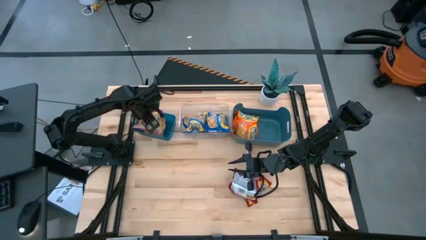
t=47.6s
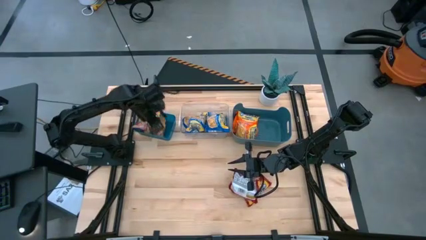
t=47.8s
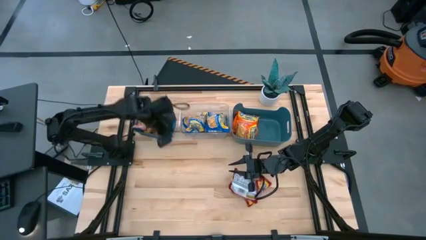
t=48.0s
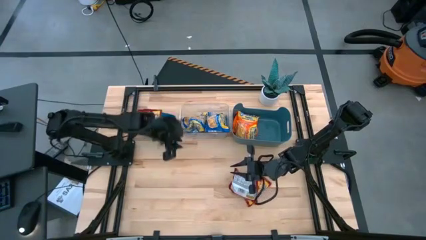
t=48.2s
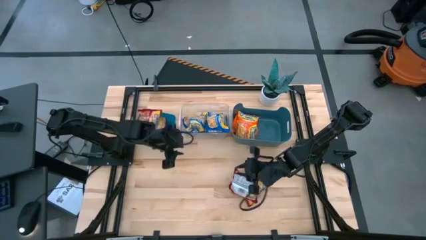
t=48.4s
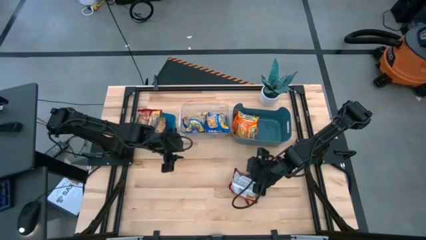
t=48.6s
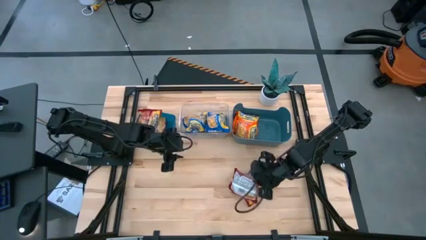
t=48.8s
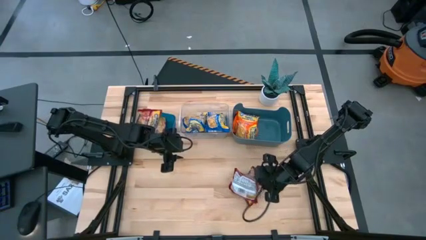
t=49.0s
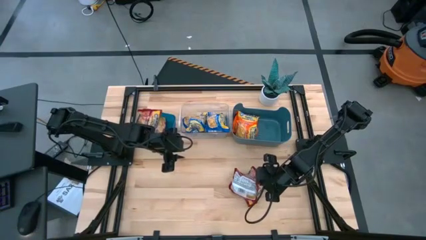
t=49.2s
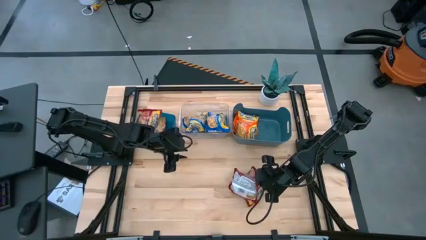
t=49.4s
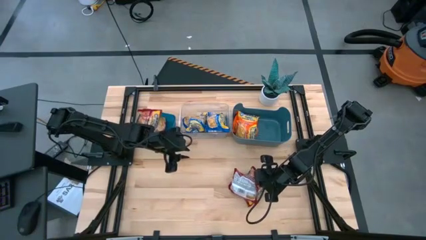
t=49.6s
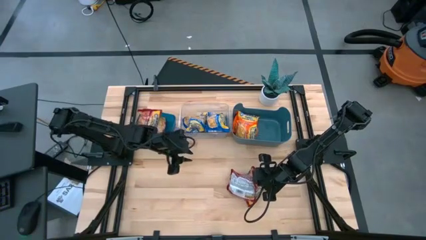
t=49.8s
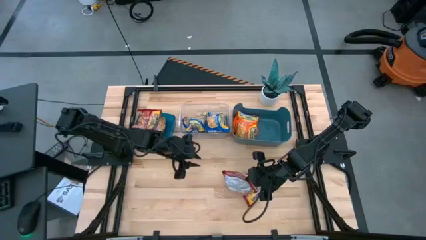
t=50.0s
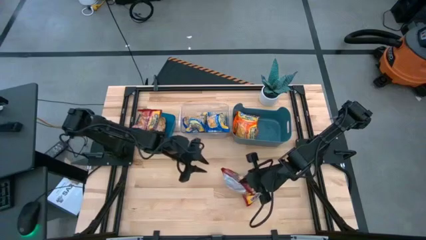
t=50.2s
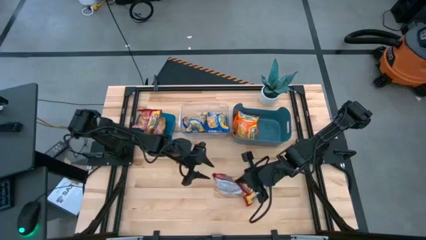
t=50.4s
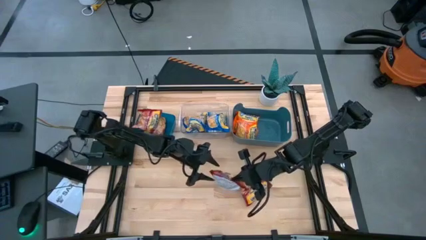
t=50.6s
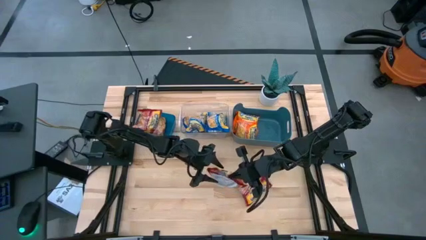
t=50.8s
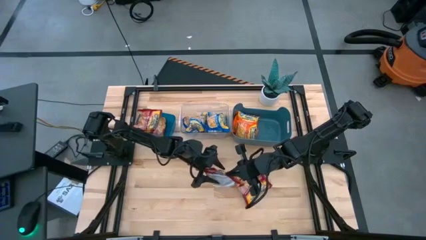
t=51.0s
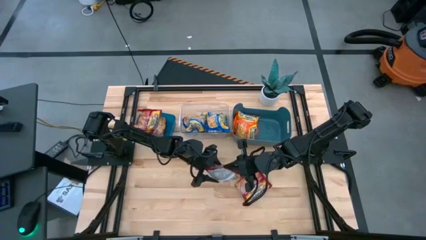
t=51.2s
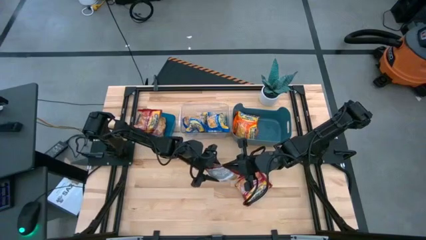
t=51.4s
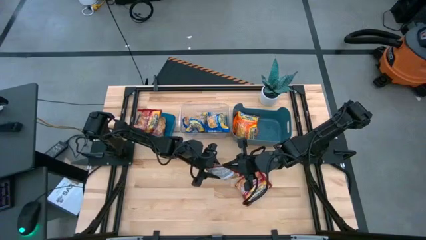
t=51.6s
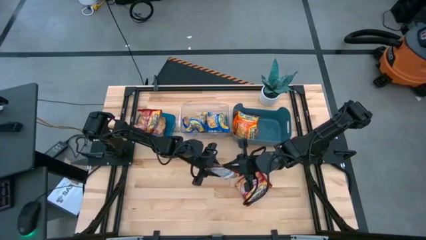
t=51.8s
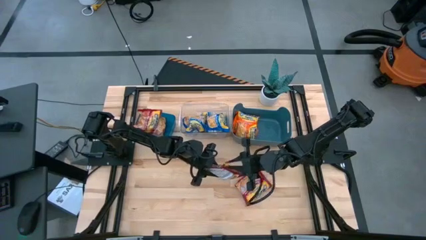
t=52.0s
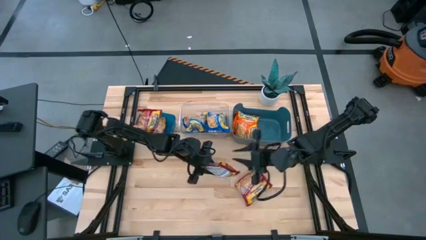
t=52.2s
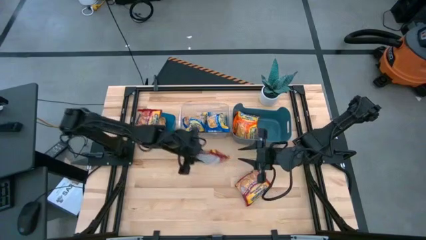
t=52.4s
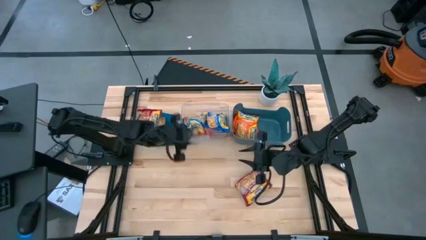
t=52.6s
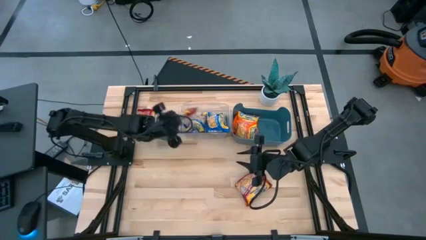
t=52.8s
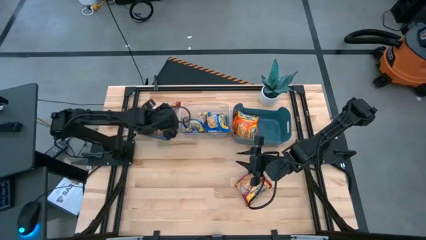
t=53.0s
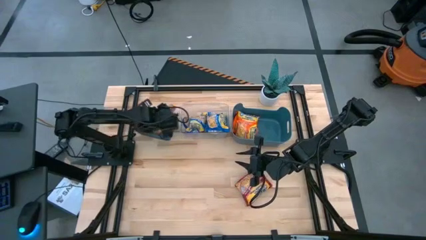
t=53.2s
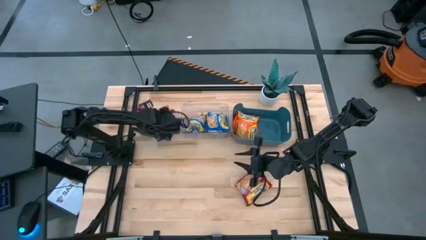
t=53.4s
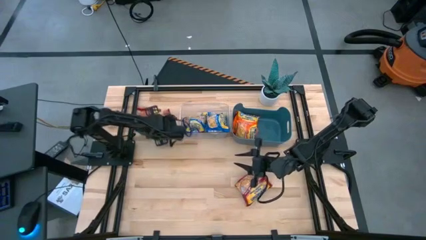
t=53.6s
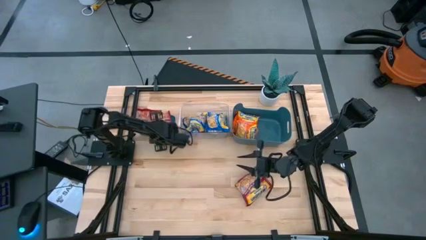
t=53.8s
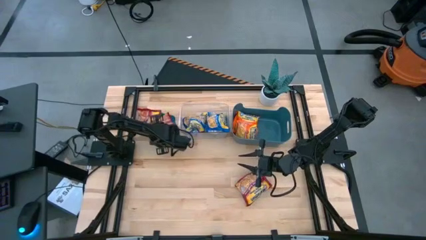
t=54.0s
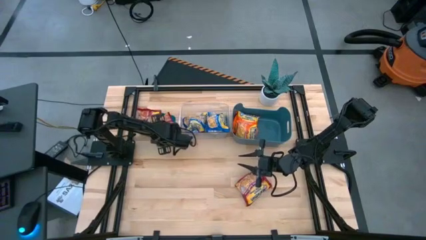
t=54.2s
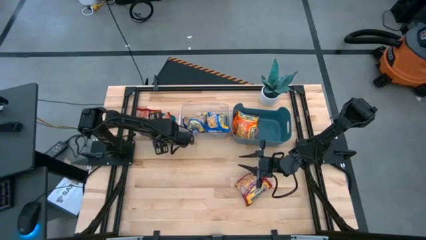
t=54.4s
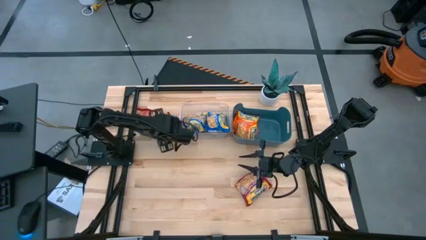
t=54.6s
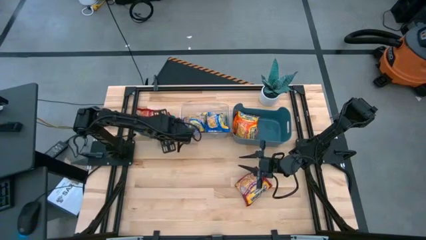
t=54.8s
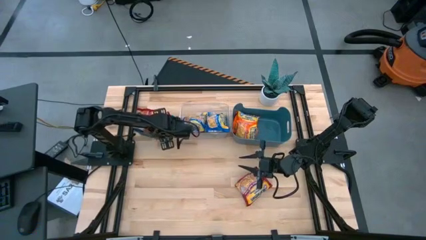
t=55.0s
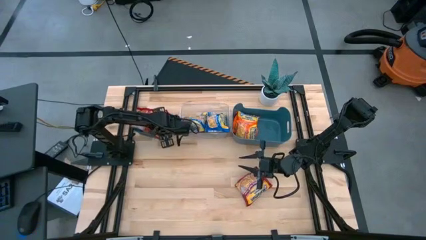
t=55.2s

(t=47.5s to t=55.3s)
Task: Sort Maruchan noodles
Put the red noodle pack into the left blue bin

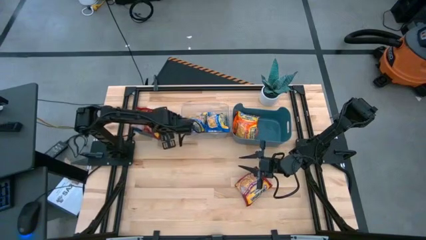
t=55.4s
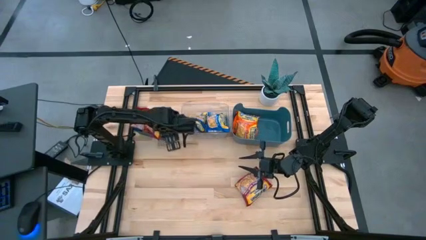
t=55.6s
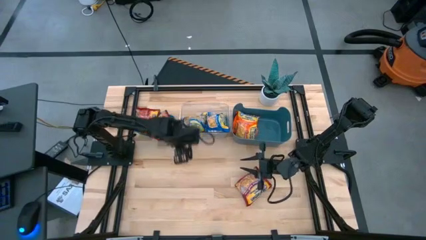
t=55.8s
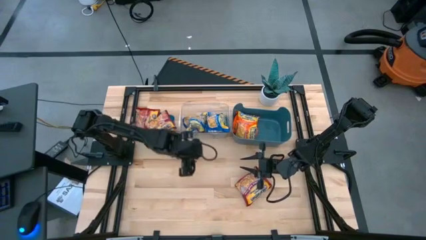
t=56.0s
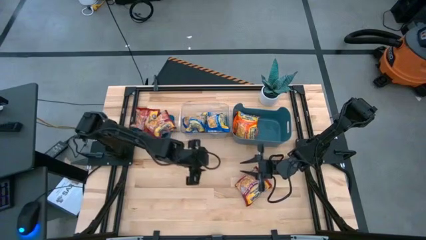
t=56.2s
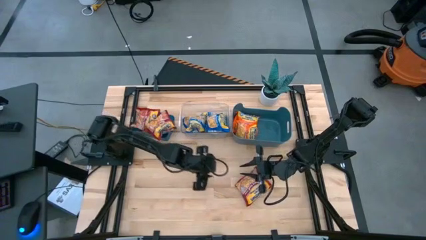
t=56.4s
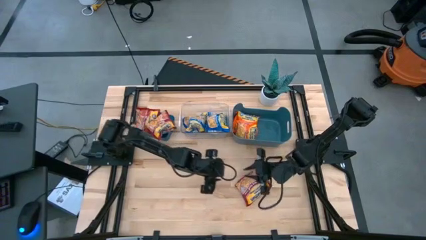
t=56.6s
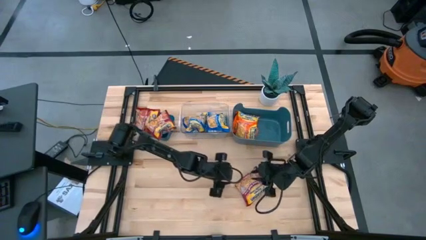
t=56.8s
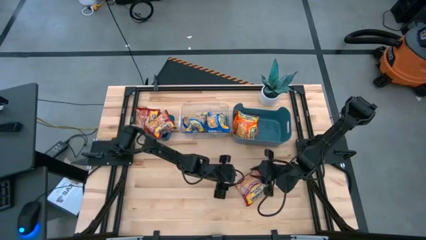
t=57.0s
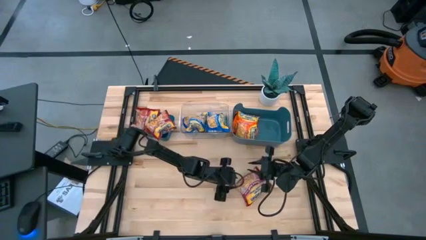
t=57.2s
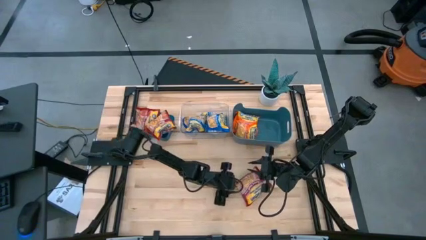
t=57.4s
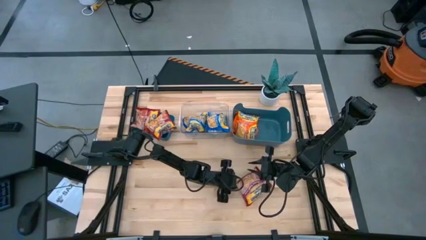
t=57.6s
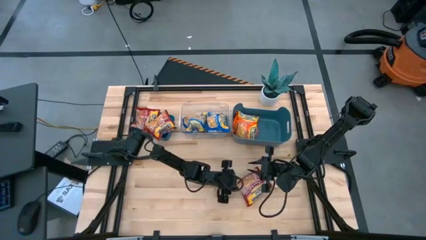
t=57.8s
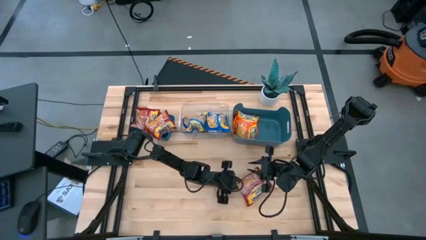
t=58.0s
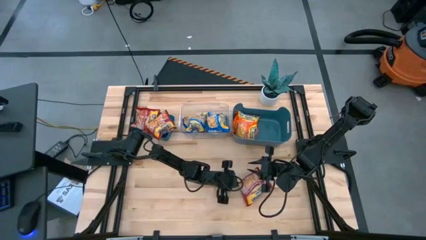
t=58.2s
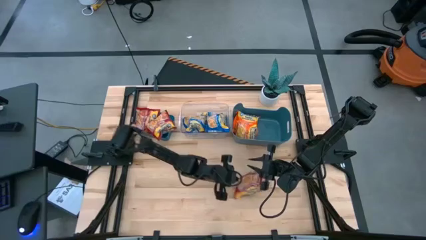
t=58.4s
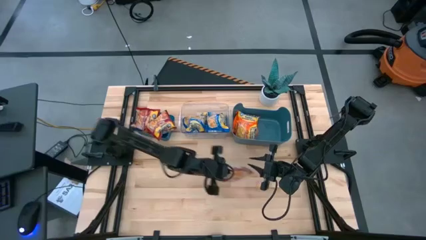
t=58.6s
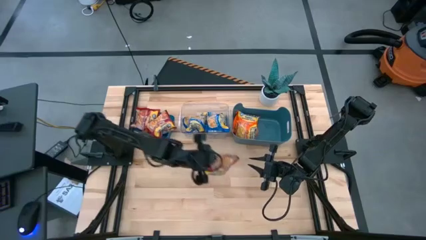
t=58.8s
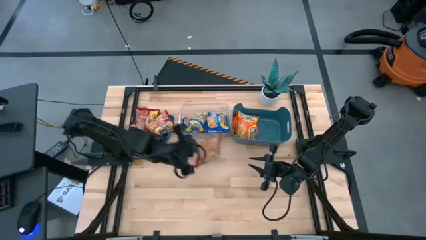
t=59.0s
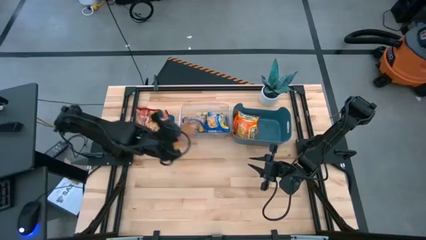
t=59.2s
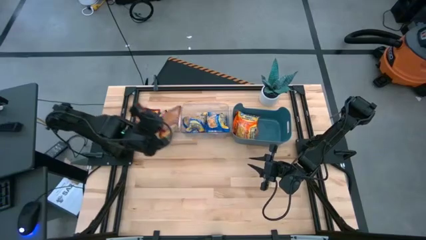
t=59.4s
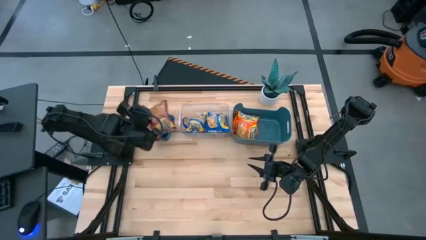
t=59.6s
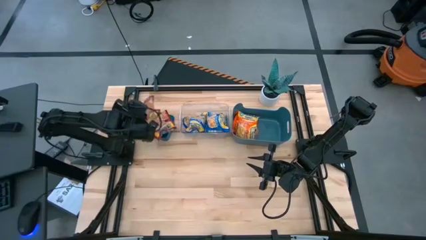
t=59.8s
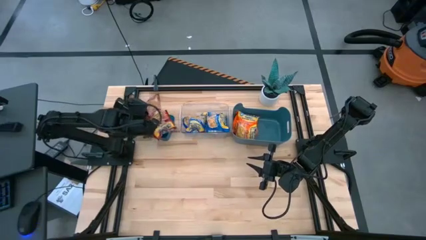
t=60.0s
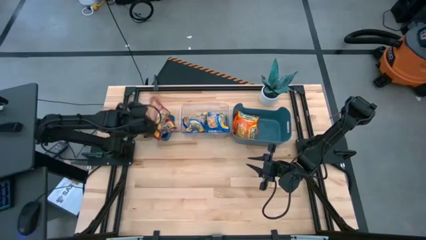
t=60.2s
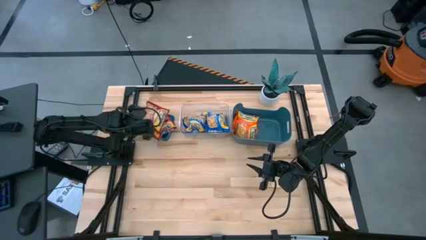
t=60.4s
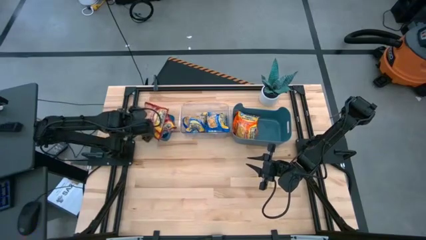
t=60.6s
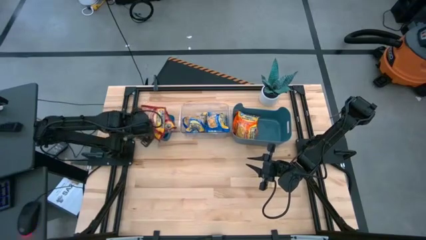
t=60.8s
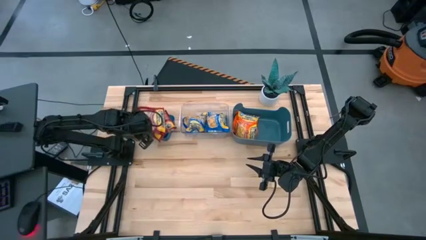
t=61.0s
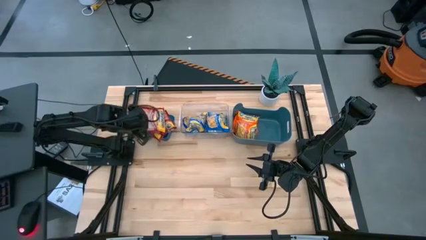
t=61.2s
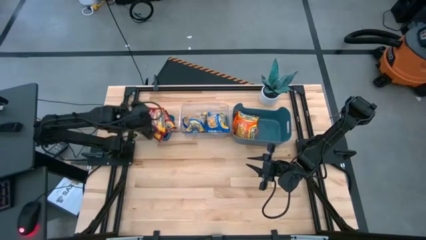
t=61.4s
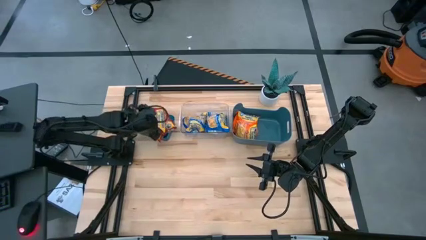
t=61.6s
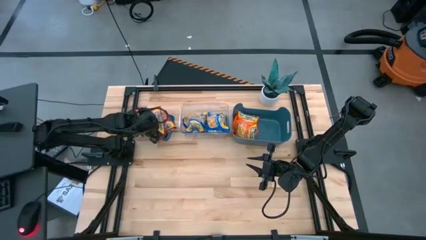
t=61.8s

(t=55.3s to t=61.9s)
Put the red noodle pack into the left blue bin

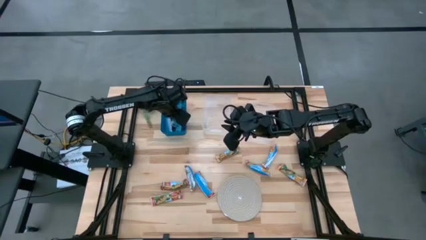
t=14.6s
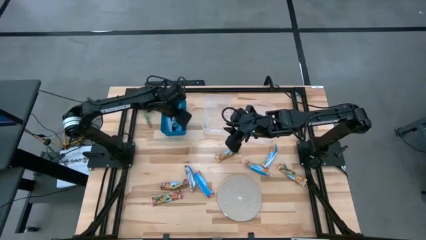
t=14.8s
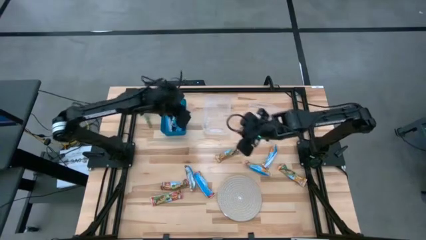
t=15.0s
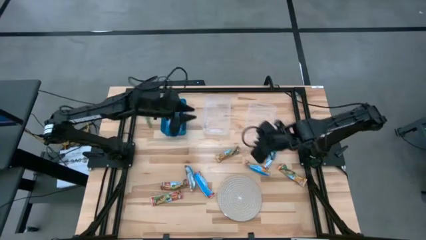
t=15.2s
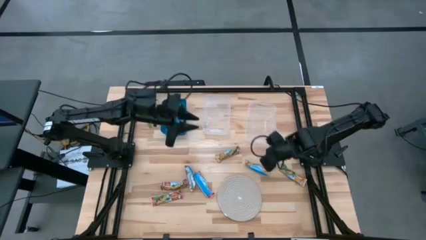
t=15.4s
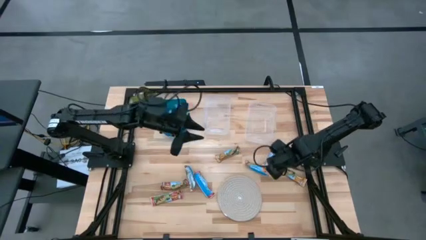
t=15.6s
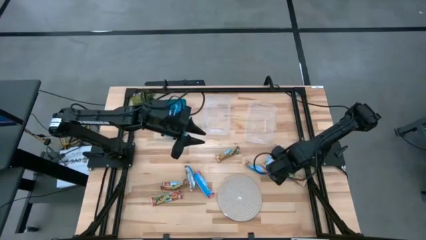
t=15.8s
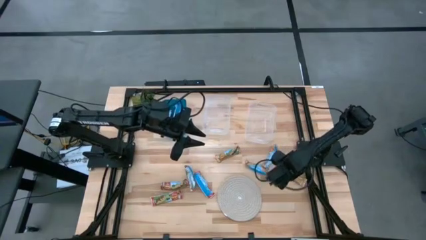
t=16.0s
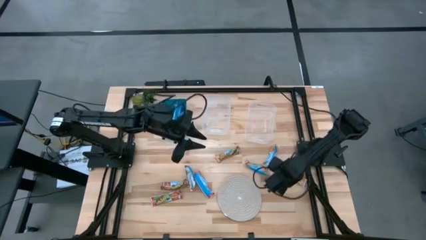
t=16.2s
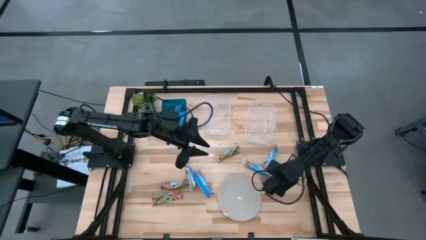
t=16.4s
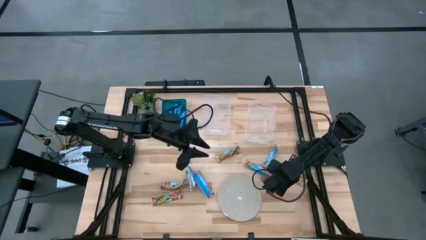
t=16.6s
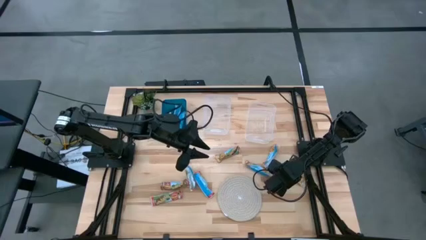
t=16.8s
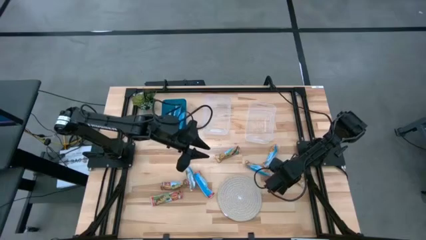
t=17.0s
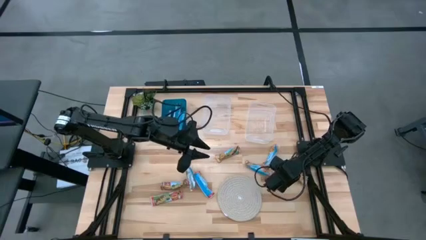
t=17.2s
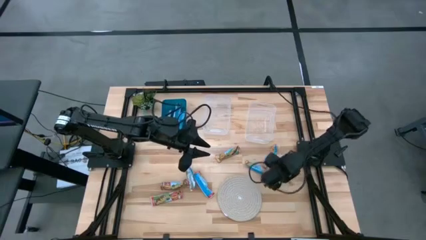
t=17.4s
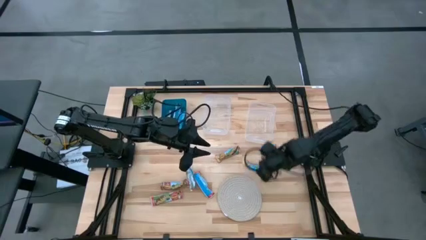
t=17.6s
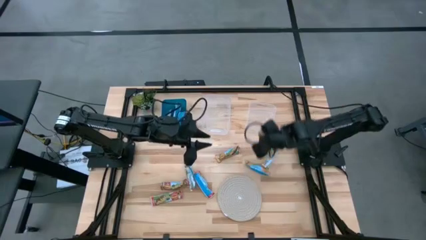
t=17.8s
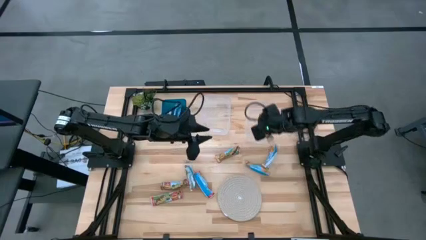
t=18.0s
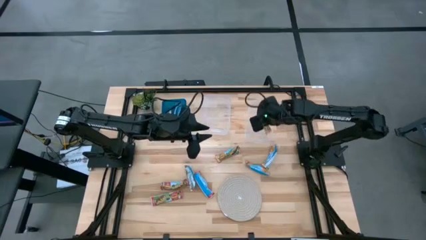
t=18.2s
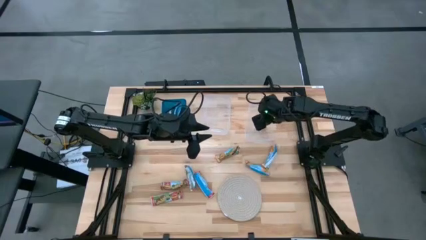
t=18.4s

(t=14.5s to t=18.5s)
Task: Pick and place Granola Bars by type
Put the yellow granola bar into the right transparent bin
